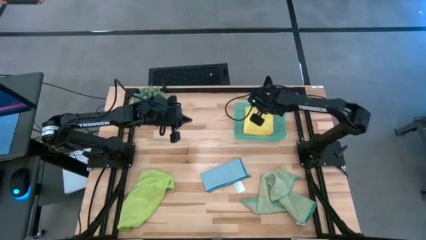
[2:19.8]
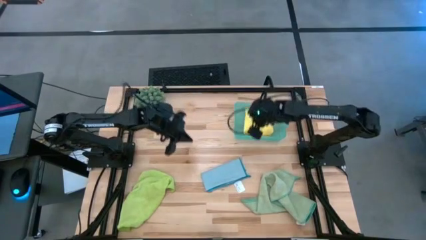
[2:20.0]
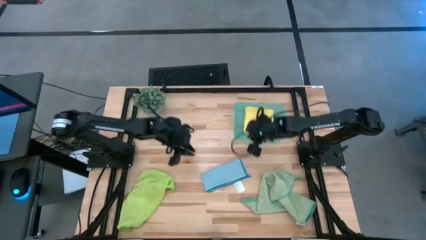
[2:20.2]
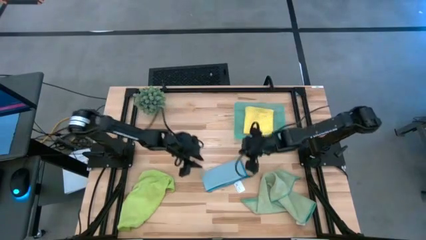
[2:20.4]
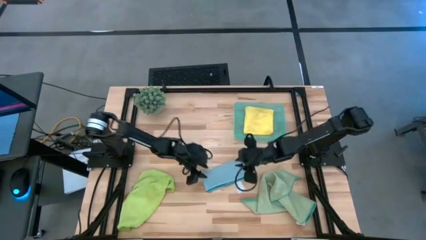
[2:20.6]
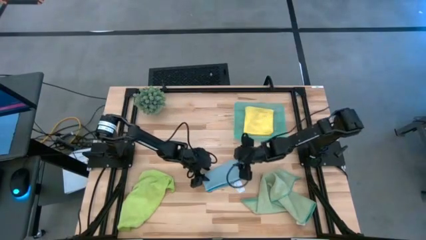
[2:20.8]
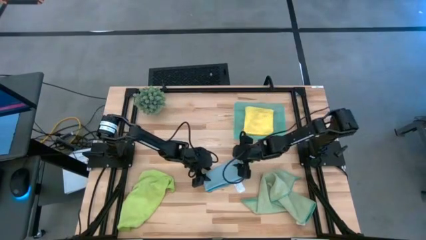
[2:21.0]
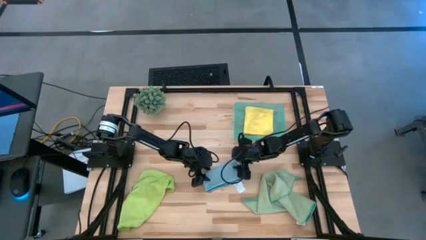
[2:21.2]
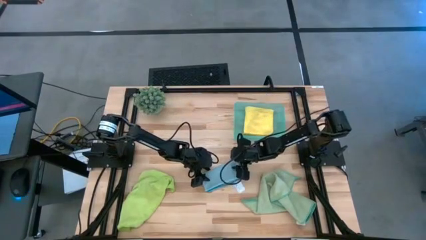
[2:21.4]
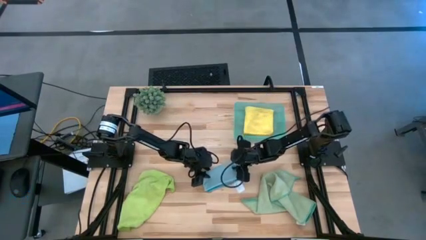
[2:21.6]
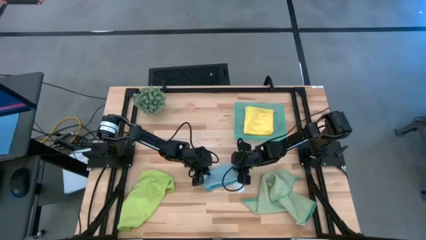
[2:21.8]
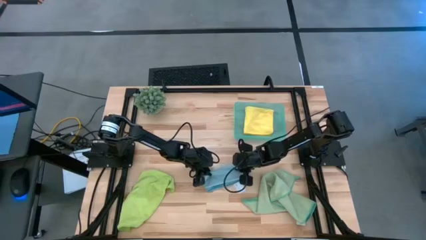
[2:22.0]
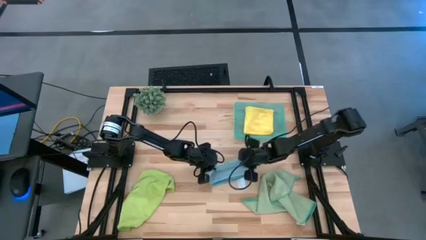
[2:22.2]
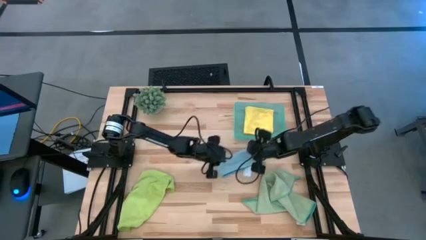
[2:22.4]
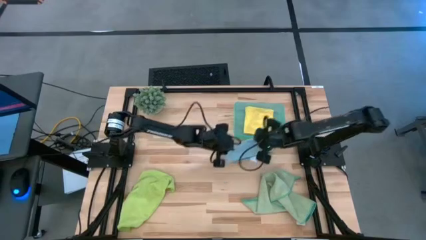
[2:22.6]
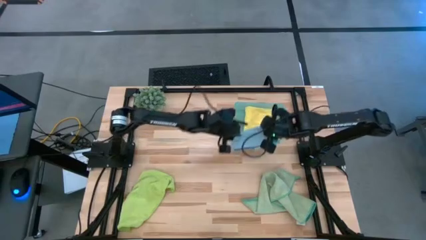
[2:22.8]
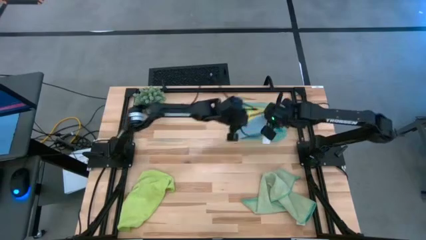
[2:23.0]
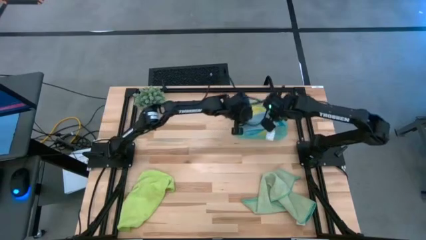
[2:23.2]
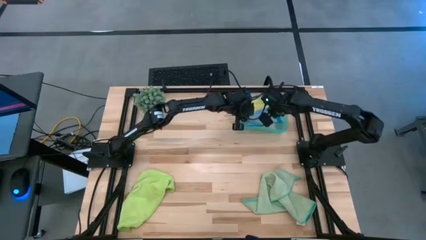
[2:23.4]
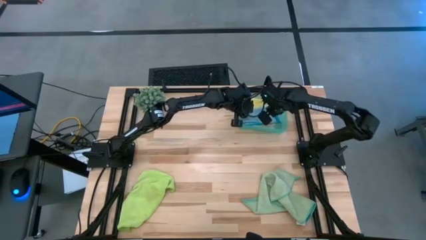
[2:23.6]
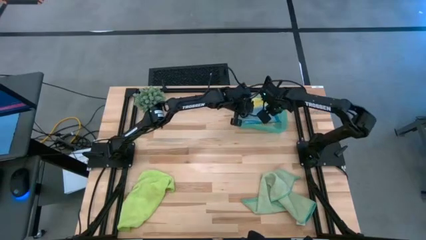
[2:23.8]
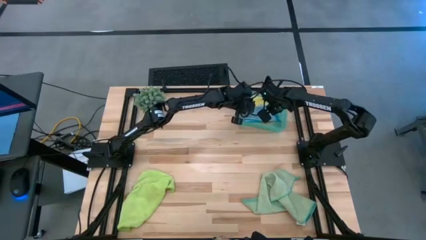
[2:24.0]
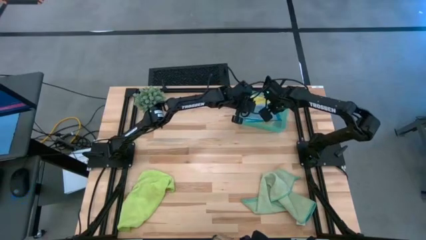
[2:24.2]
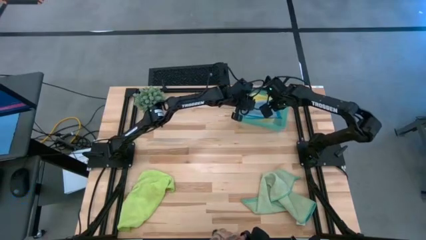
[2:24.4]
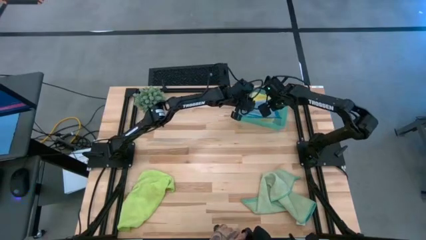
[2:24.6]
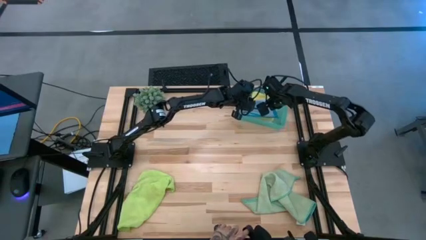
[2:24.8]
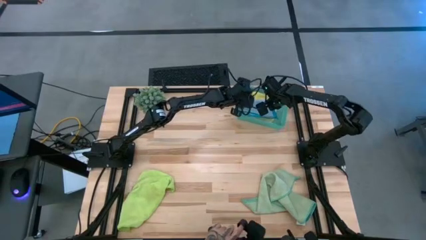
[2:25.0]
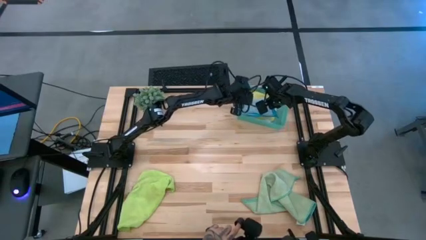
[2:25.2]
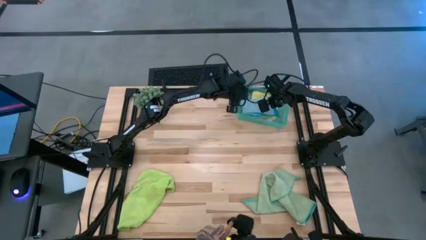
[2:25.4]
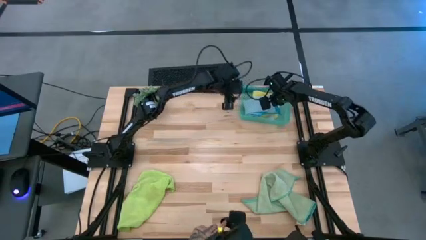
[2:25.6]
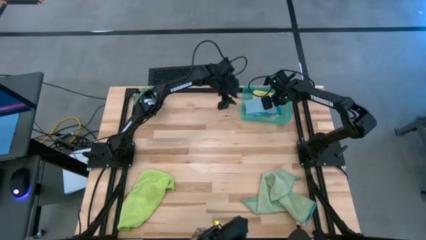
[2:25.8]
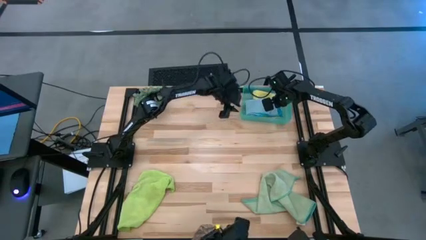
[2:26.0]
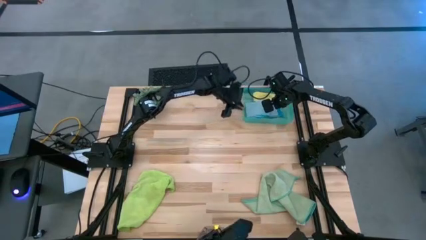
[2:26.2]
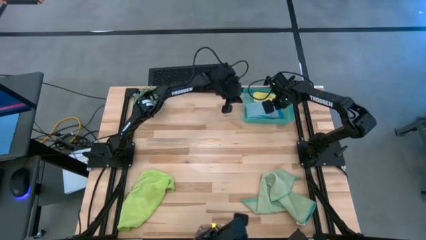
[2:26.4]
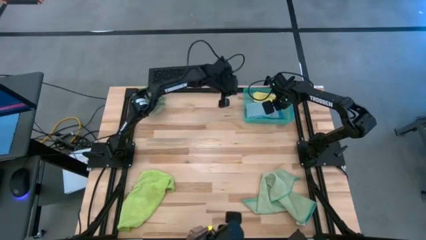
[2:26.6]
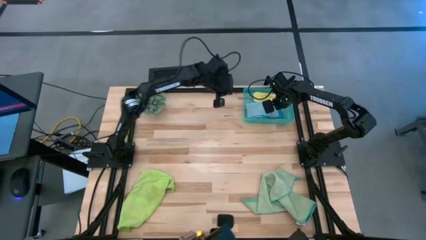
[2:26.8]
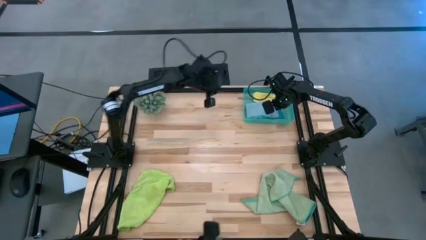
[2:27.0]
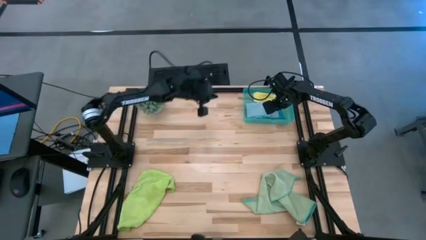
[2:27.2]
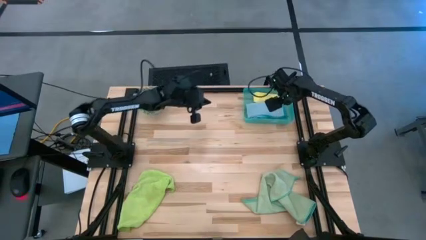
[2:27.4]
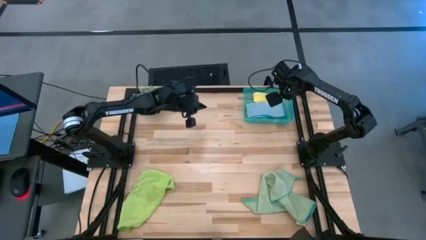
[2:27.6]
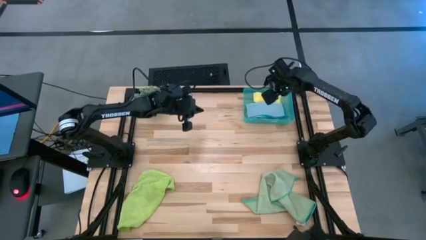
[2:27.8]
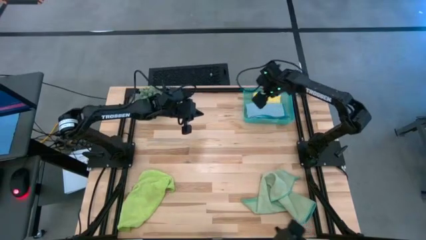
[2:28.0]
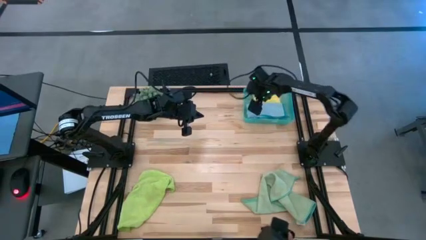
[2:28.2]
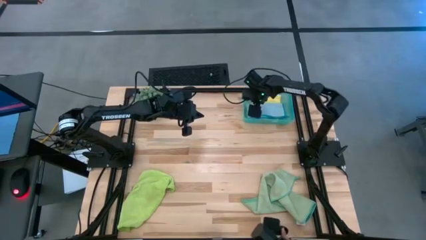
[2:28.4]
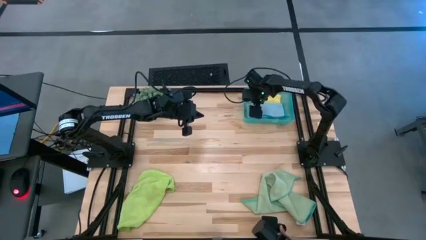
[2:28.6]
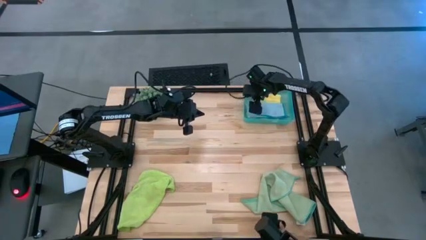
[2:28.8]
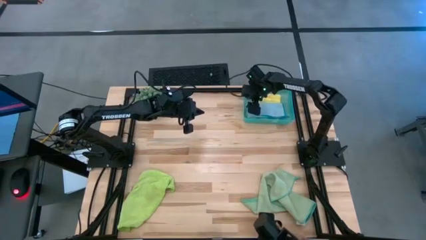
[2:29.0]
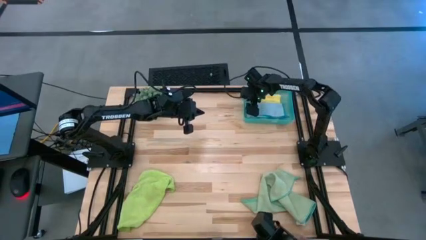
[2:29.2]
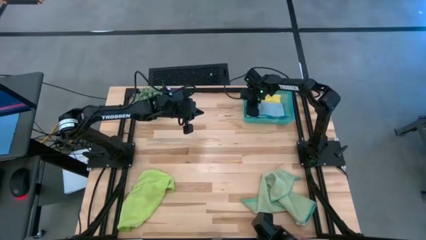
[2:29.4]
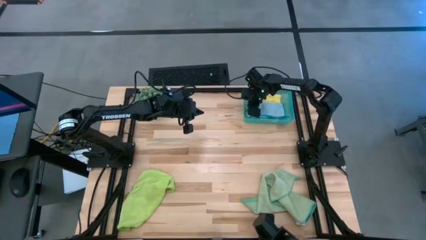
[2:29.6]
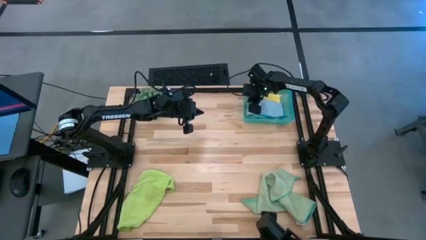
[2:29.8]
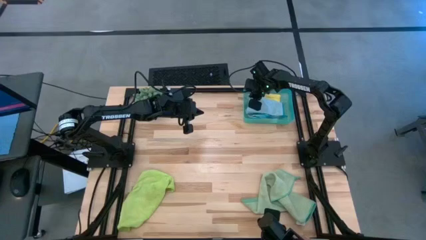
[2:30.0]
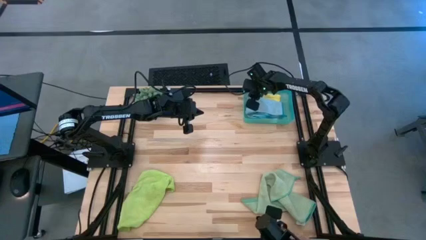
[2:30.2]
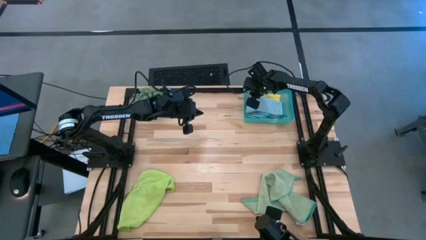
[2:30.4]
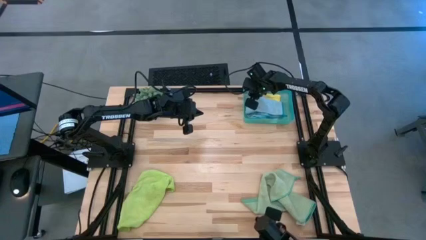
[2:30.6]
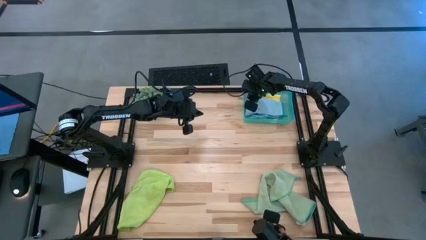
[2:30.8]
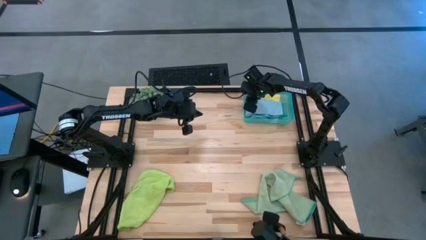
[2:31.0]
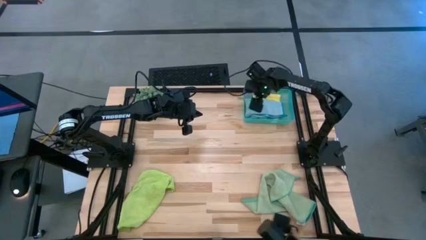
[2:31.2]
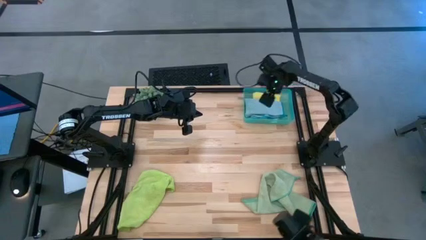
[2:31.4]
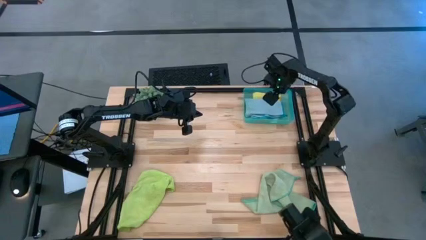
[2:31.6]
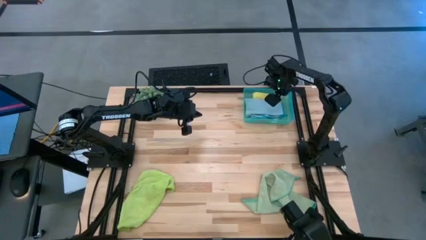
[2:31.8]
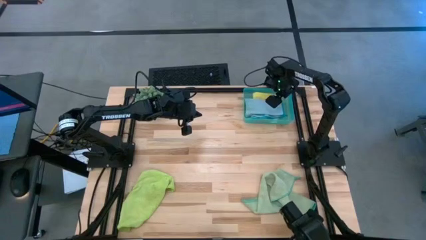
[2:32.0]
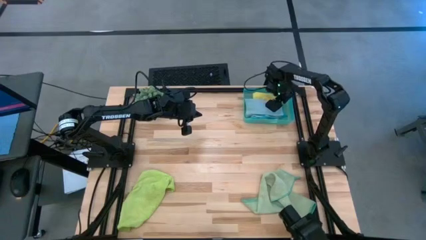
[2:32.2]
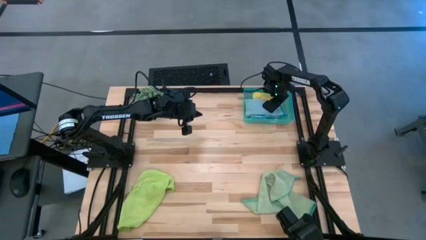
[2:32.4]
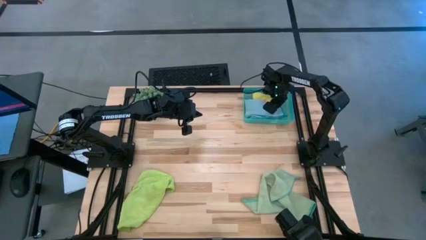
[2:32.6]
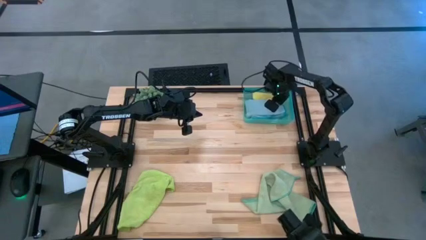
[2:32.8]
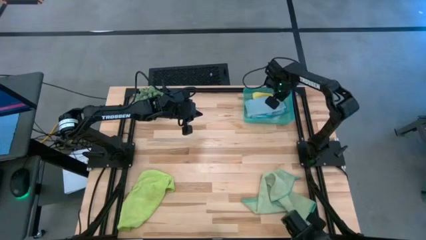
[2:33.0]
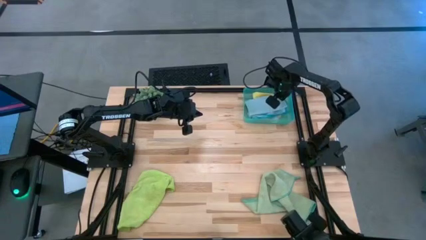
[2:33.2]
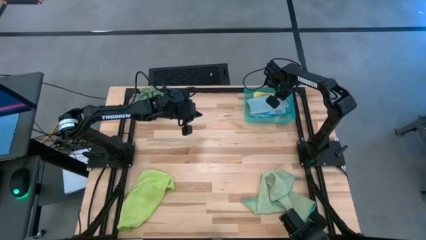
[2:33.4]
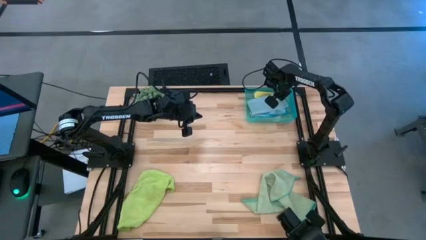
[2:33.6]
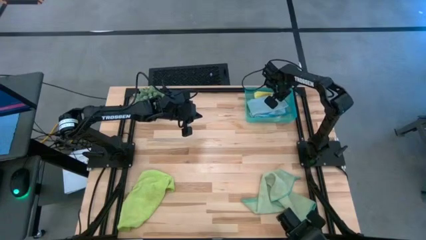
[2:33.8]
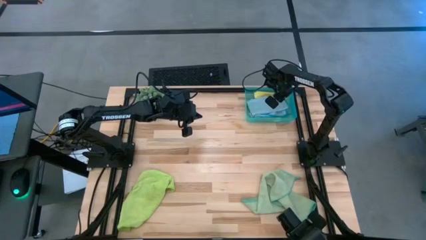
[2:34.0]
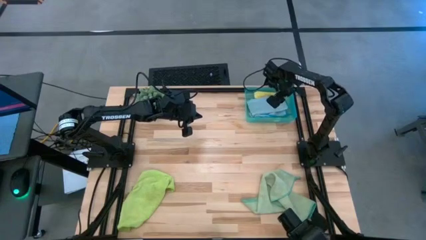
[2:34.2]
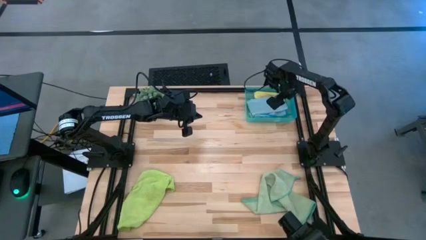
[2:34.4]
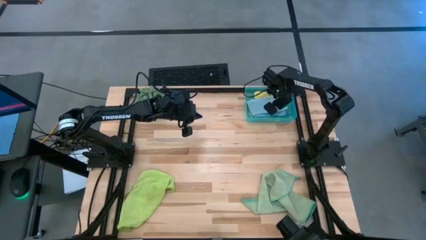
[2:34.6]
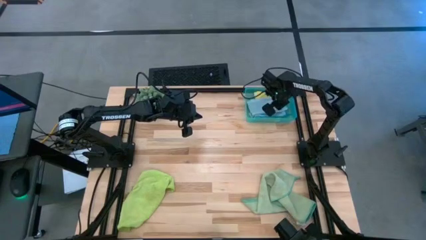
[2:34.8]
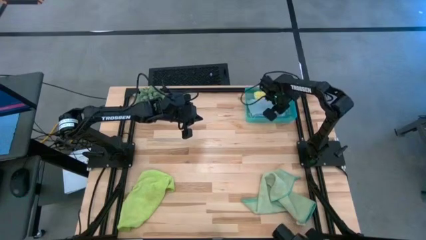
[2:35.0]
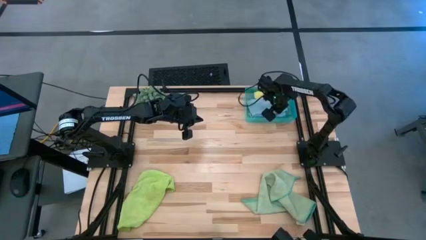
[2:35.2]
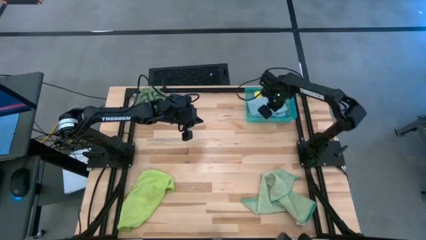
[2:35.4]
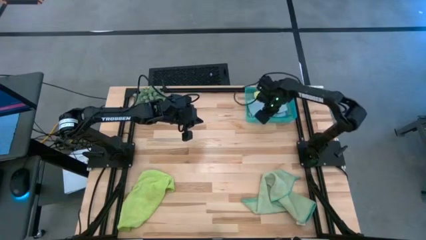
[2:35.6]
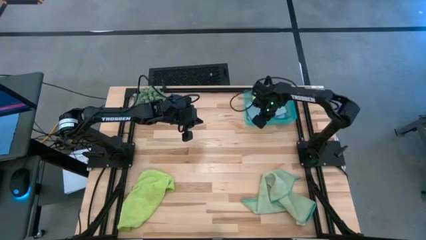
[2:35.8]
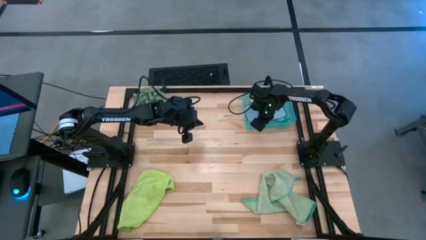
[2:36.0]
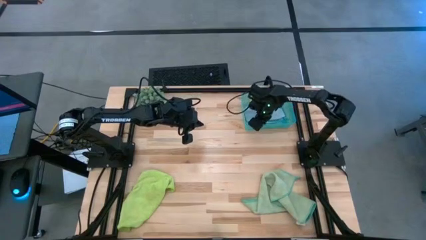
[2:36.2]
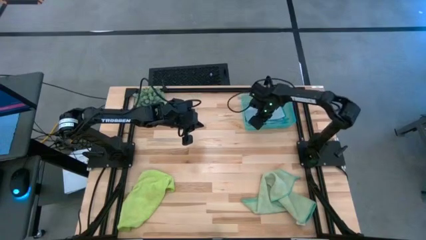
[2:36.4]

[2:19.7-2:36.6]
Task: Fold microfiber towels
Put the blue microfiber cloth on top of the yellow microfiber cloth in the blue bin and align with other
